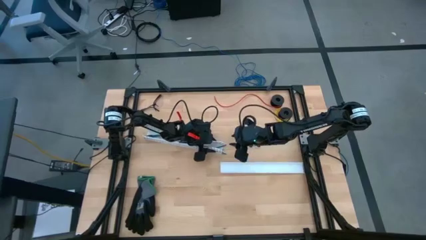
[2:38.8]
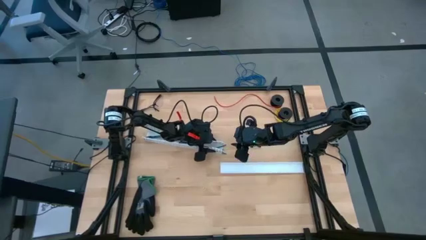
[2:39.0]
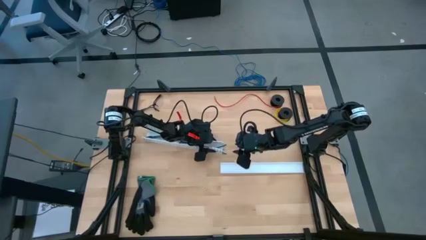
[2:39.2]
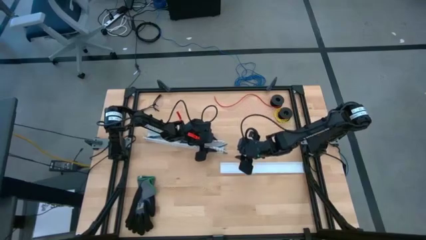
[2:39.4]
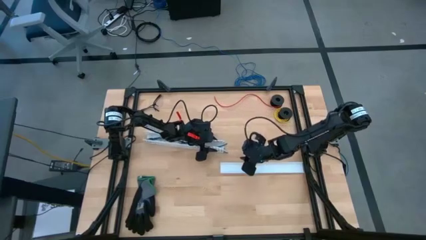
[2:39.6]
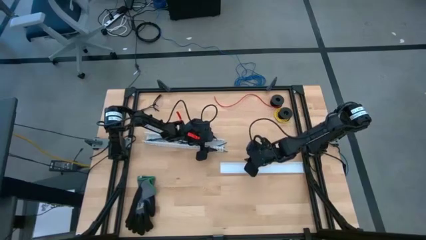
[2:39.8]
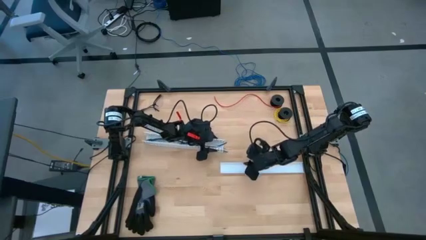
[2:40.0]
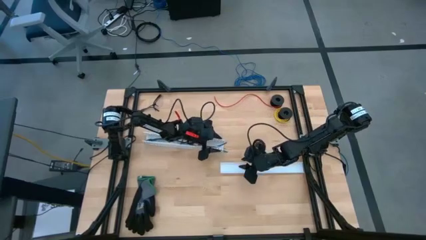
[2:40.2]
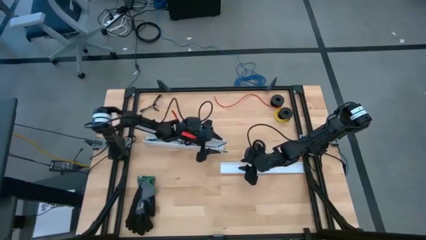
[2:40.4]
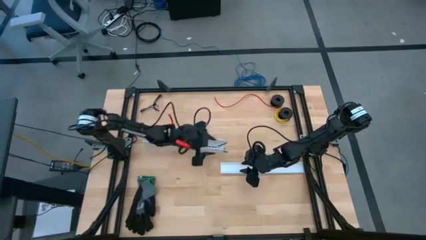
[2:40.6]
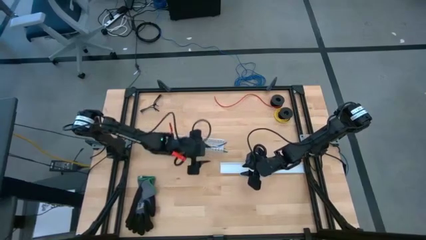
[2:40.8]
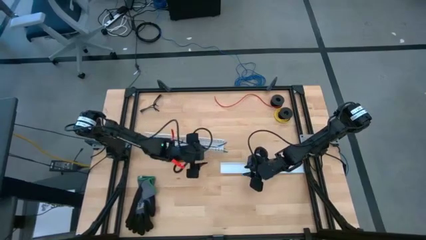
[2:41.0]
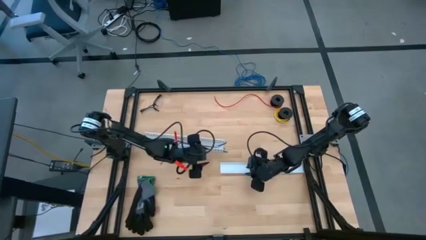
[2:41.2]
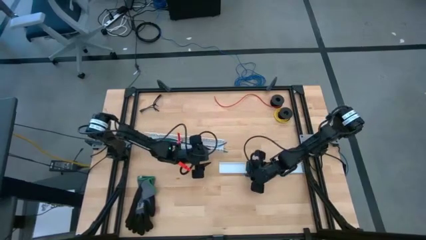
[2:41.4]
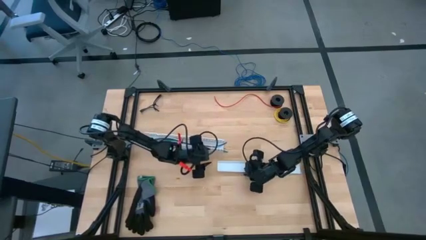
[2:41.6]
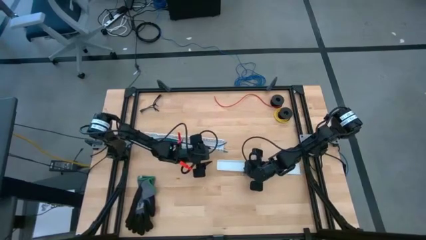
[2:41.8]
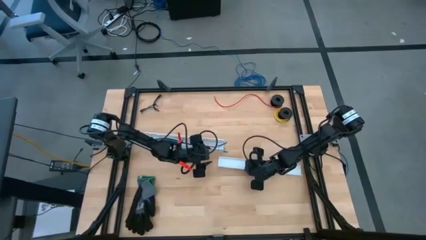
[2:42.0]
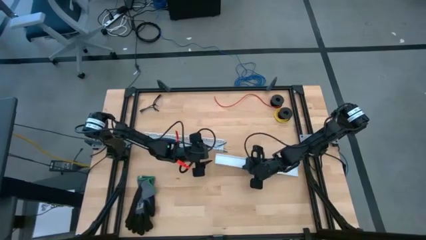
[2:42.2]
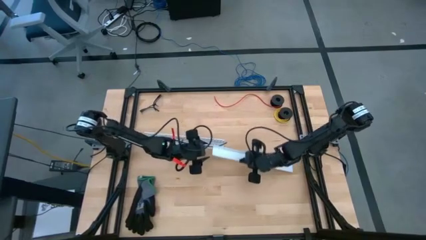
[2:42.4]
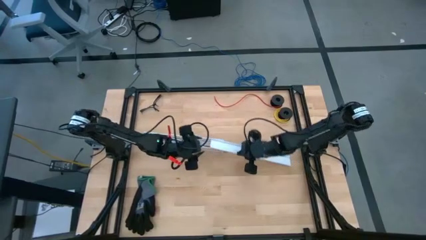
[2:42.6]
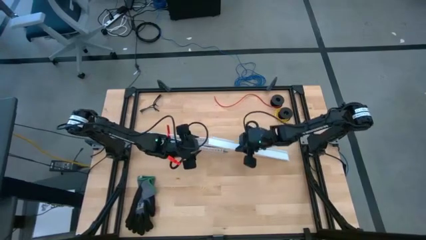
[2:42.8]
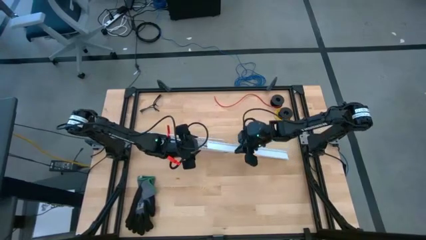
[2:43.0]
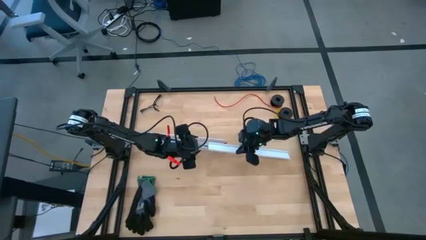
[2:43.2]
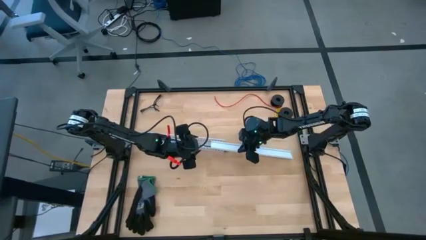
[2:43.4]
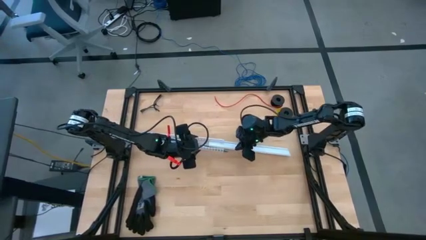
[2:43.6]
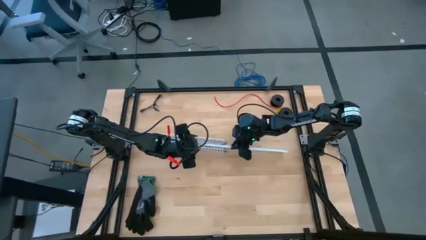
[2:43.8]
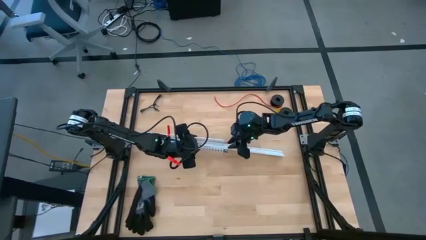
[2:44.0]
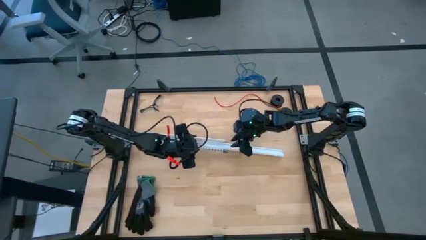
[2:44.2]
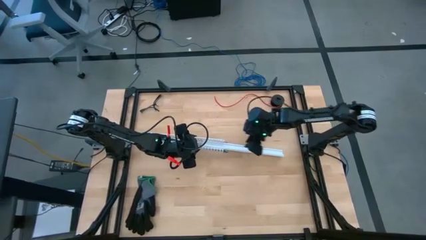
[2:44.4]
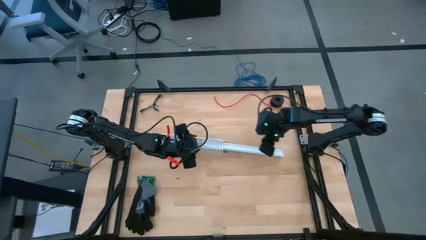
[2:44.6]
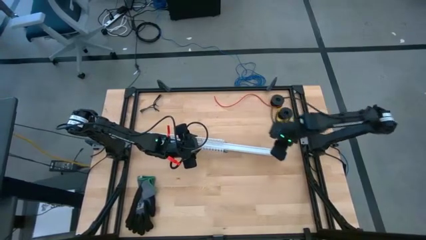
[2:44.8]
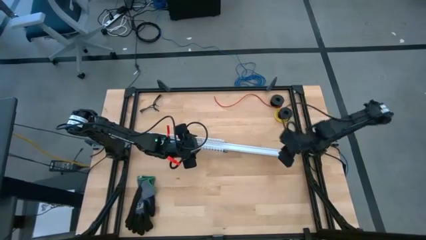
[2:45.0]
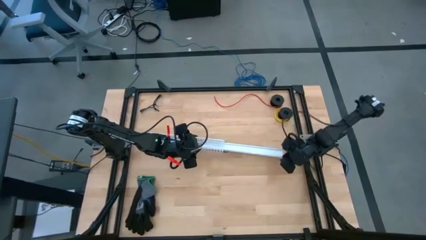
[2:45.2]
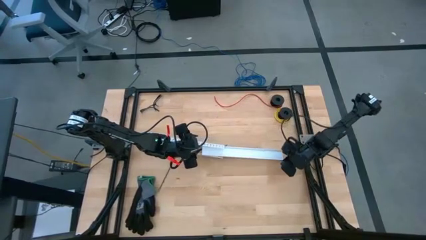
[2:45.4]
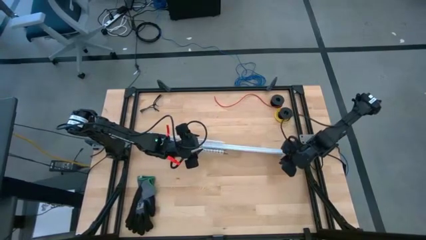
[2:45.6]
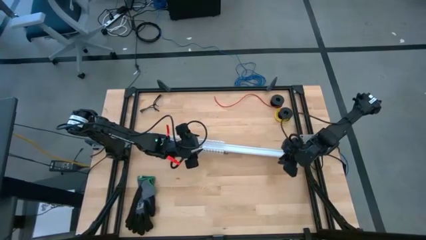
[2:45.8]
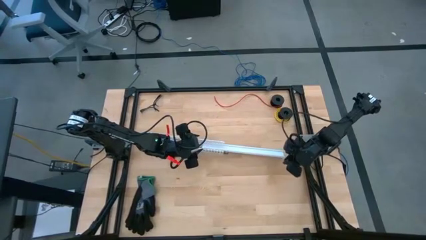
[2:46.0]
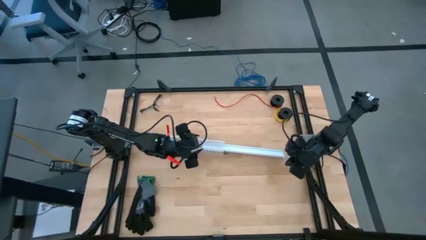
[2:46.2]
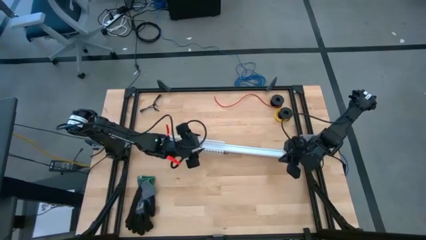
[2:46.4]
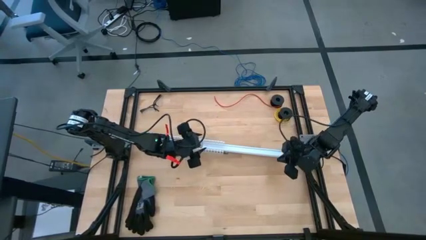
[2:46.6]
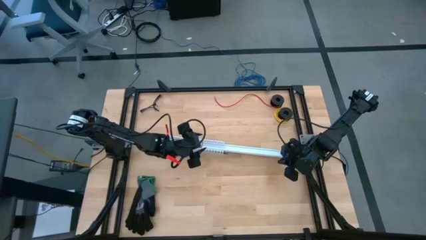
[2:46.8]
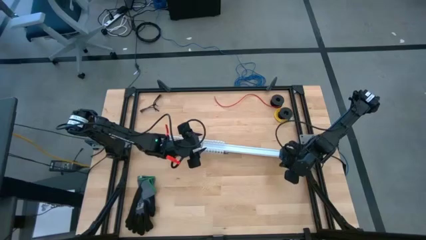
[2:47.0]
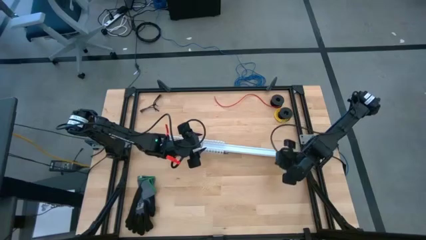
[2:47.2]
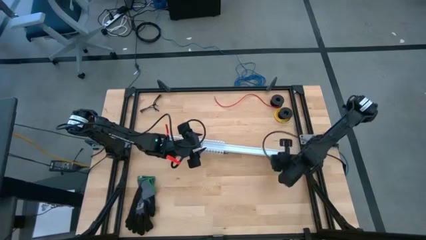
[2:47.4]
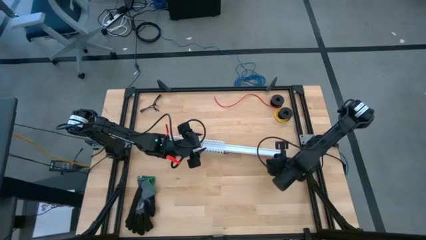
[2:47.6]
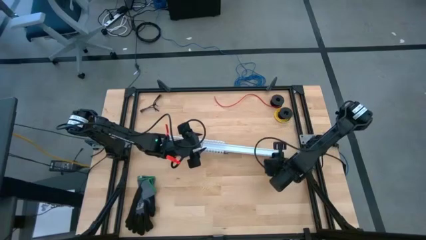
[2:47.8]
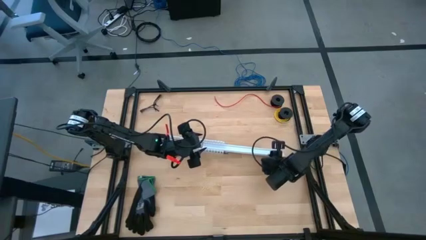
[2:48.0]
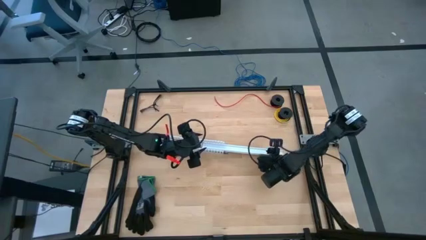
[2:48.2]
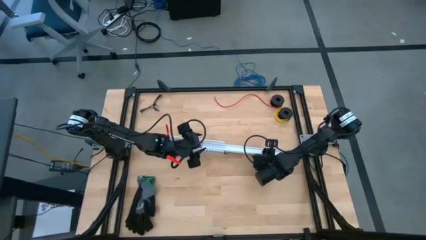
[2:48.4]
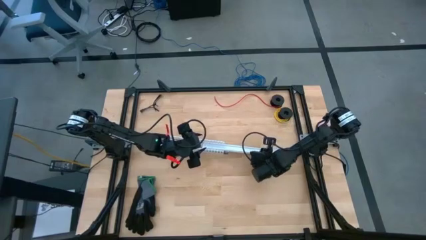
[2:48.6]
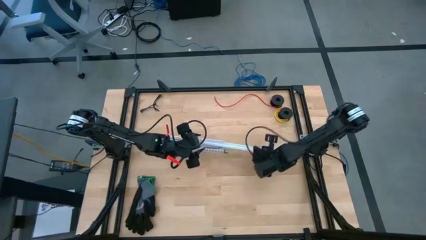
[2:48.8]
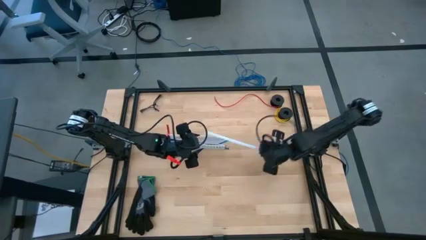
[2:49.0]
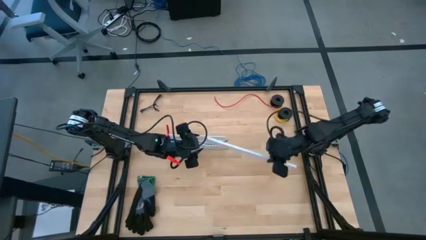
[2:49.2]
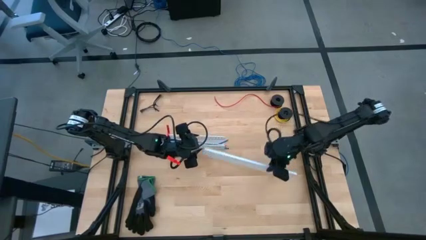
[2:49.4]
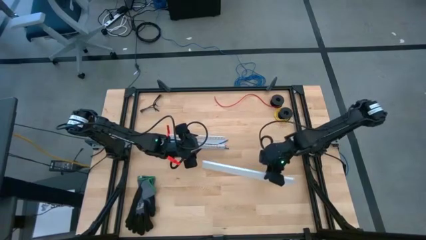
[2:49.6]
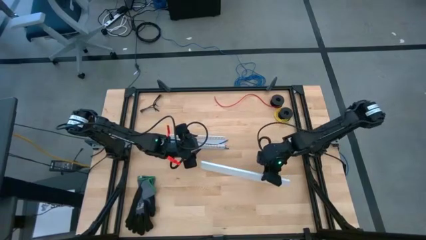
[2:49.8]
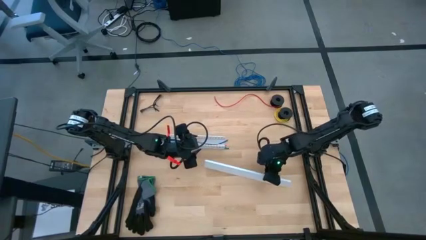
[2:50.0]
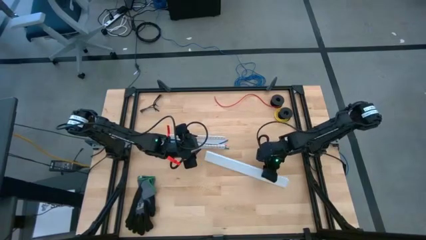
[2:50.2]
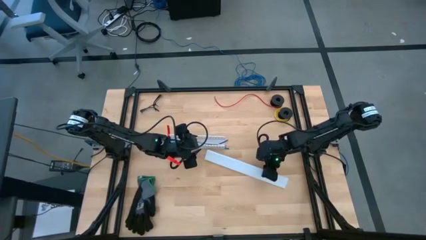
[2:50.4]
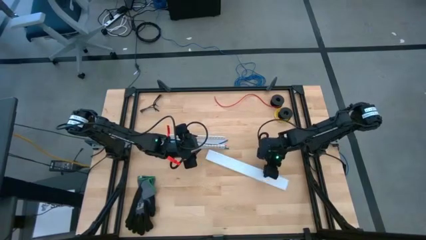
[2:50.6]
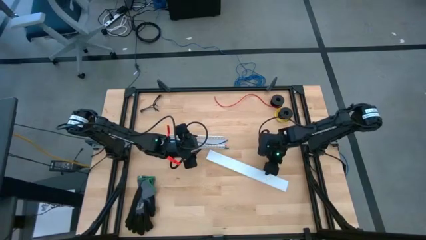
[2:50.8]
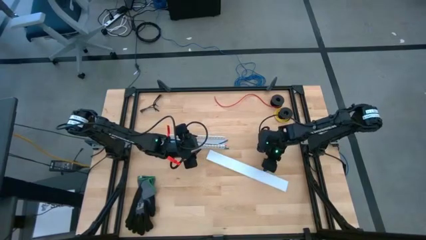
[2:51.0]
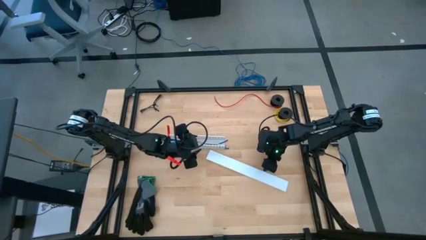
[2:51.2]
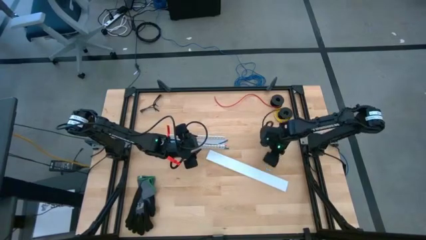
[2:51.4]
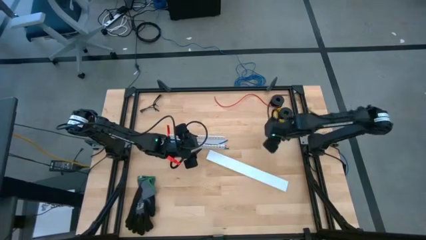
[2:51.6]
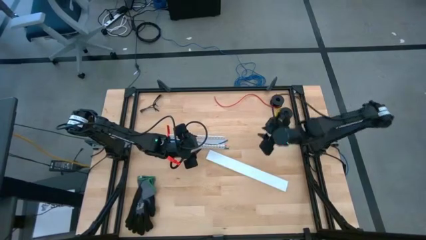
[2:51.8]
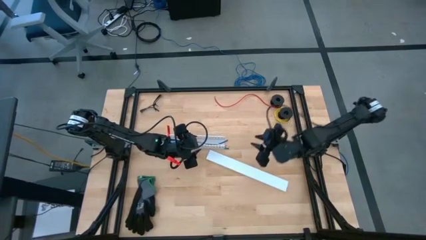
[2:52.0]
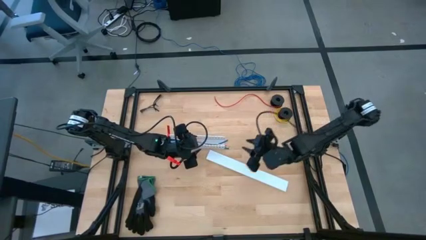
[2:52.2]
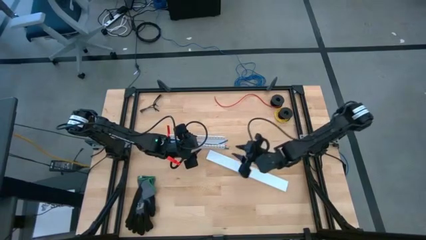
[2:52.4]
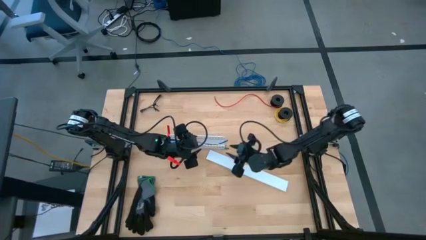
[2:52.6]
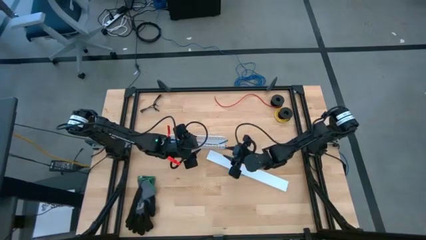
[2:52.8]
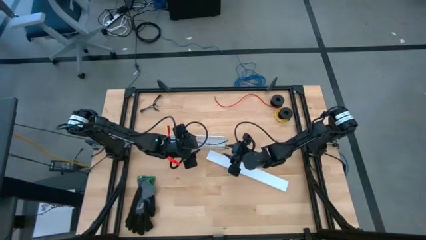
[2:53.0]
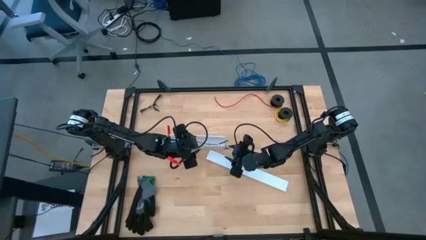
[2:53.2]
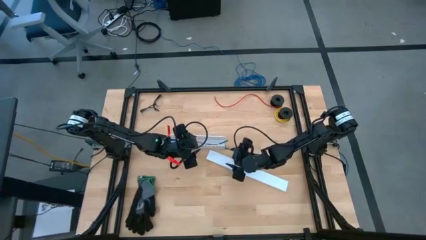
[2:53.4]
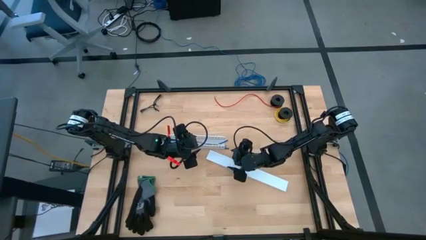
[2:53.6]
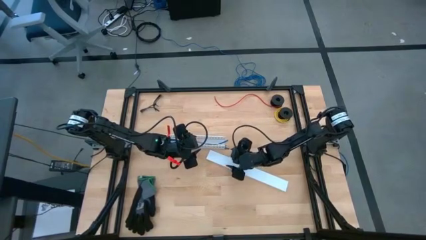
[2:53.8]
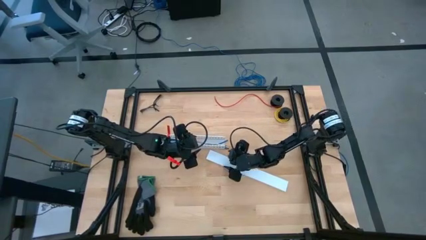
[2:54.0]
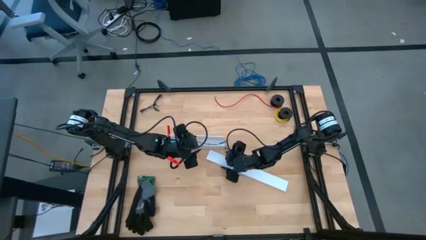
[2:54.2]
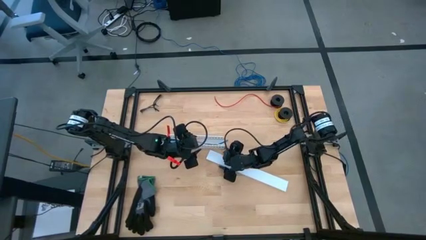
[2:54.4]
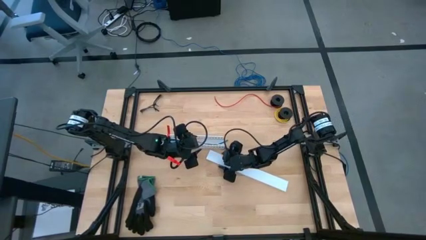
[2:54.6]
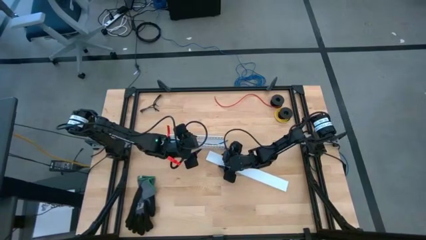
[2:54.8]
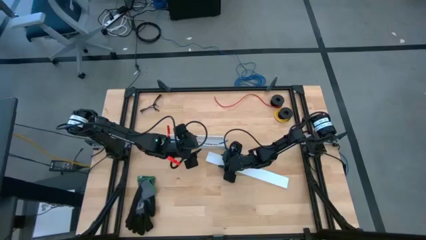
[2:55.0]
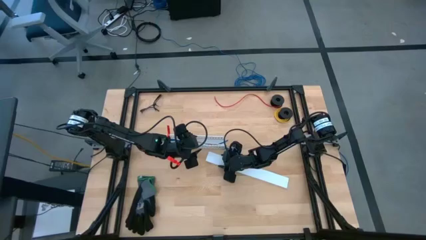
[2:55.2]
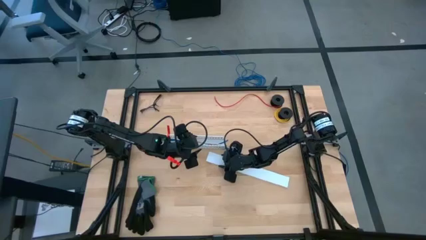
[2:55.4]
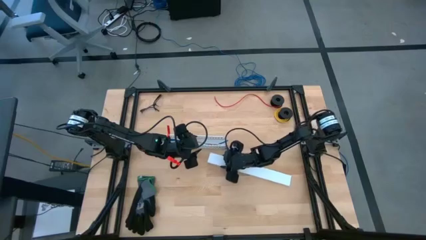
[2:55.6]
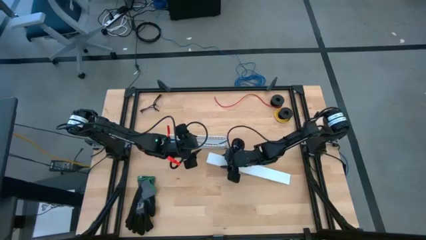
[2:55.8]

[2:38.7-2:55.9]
Task: Ziptie cables
Close the cable duct
